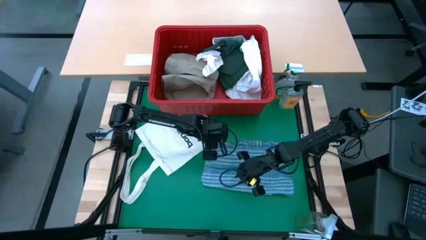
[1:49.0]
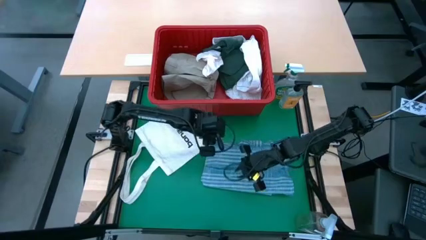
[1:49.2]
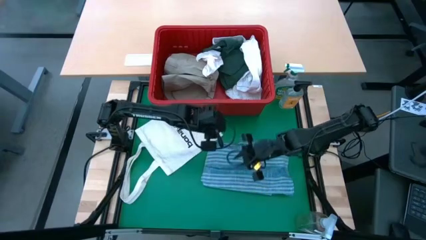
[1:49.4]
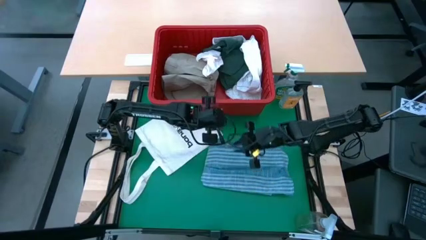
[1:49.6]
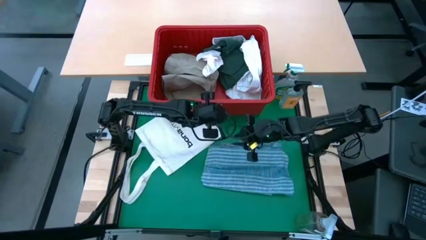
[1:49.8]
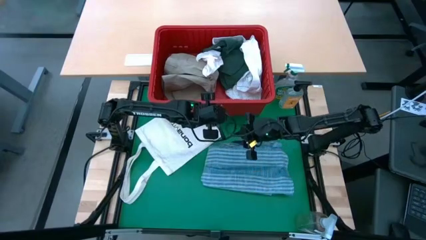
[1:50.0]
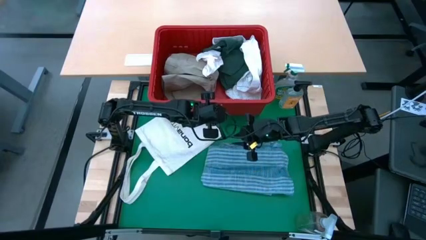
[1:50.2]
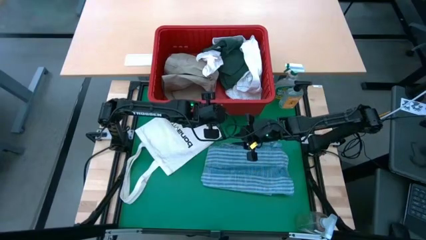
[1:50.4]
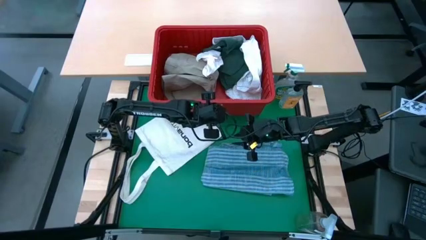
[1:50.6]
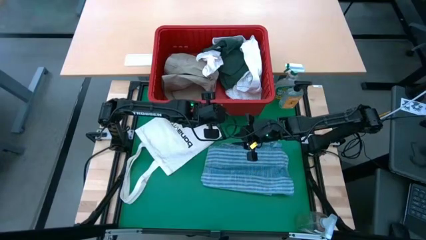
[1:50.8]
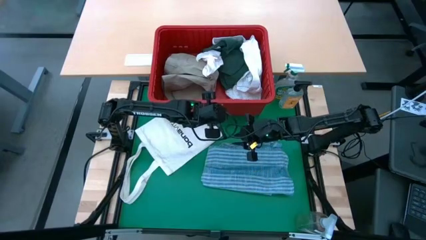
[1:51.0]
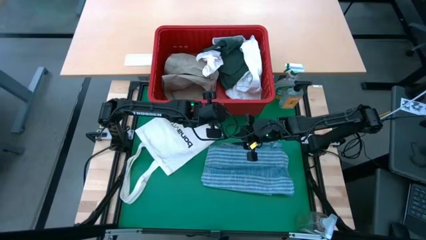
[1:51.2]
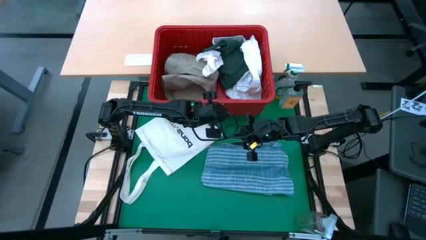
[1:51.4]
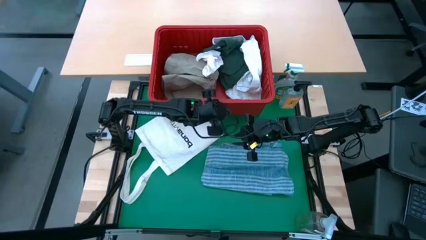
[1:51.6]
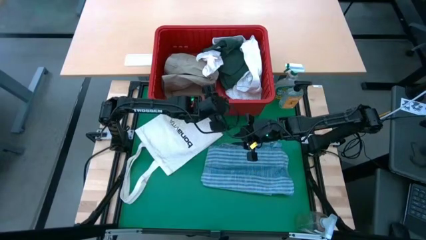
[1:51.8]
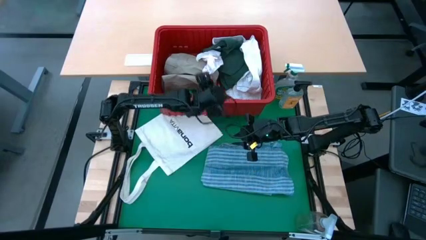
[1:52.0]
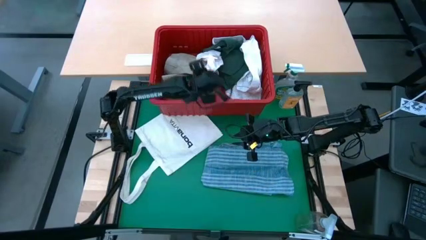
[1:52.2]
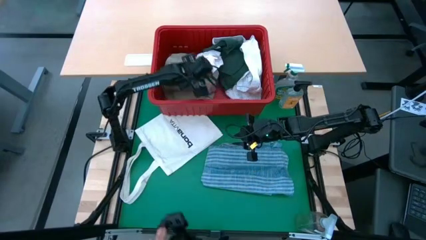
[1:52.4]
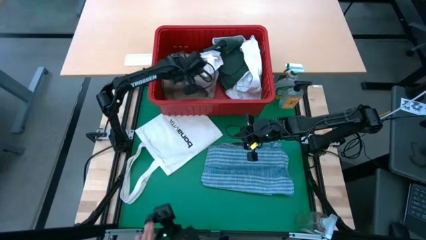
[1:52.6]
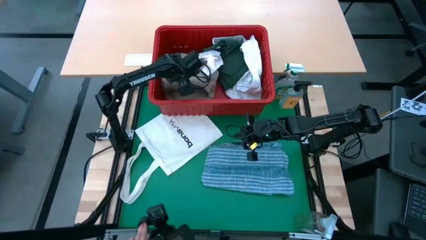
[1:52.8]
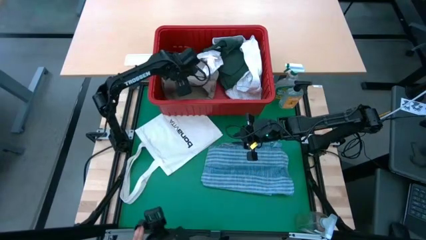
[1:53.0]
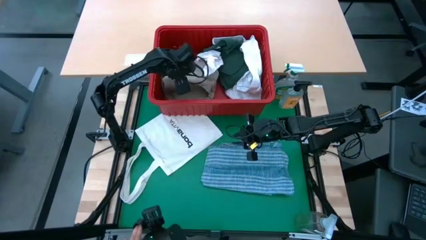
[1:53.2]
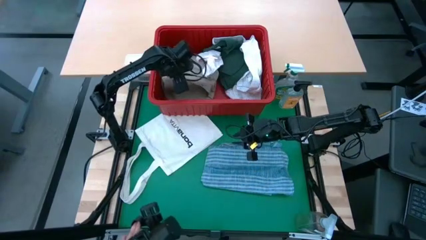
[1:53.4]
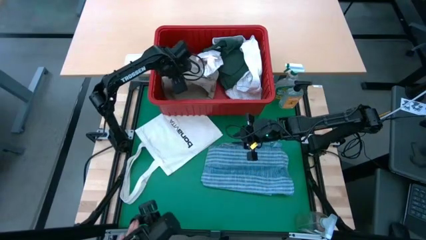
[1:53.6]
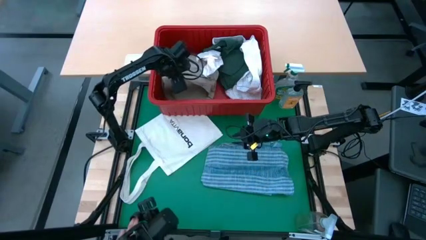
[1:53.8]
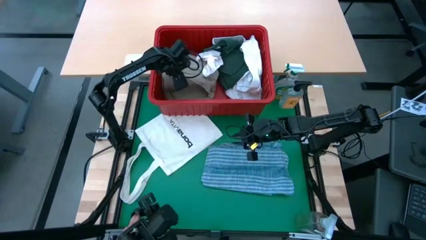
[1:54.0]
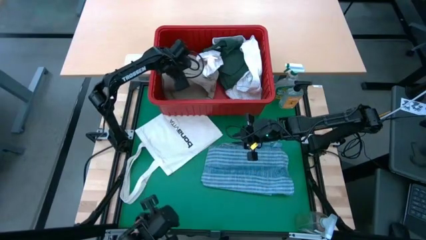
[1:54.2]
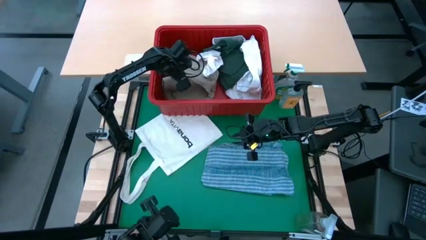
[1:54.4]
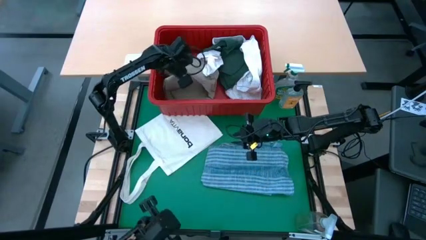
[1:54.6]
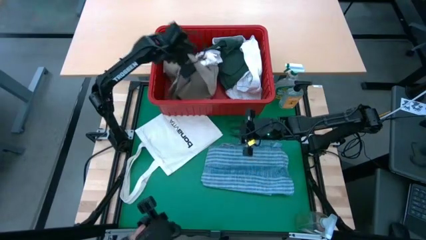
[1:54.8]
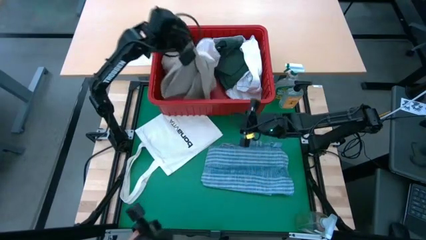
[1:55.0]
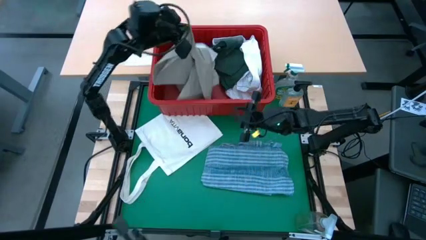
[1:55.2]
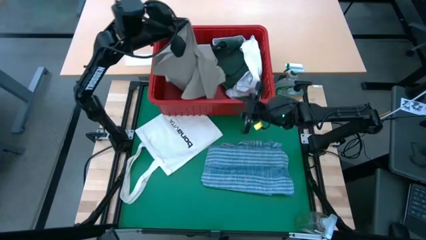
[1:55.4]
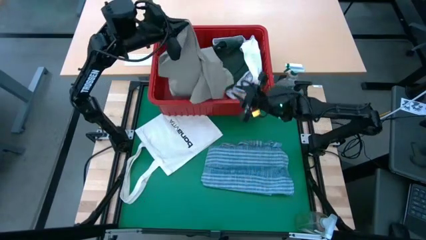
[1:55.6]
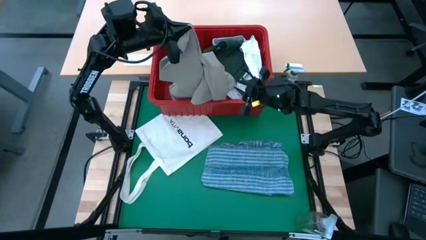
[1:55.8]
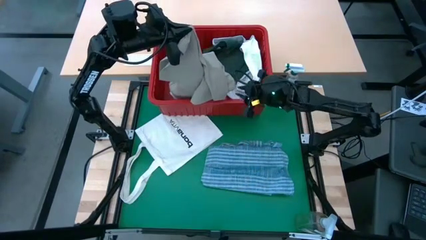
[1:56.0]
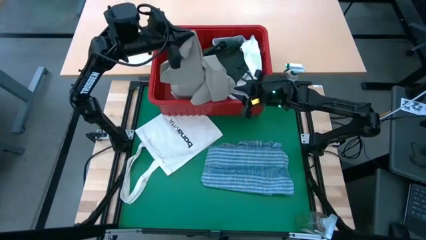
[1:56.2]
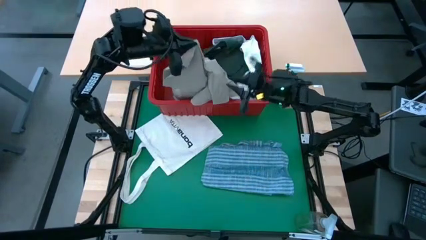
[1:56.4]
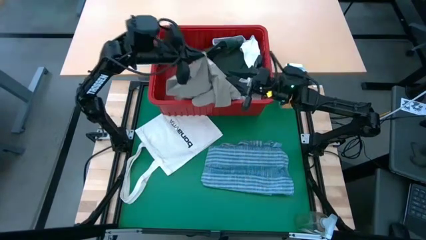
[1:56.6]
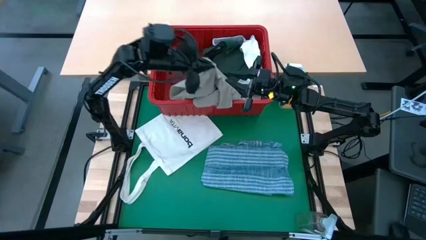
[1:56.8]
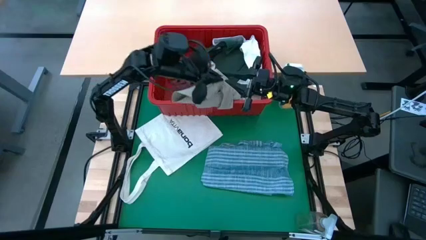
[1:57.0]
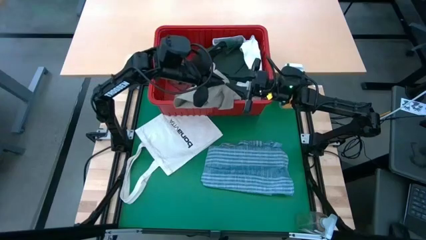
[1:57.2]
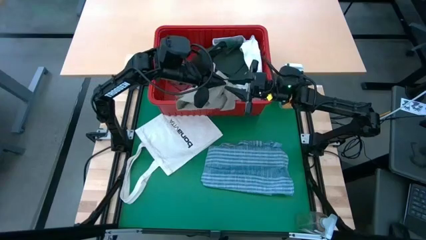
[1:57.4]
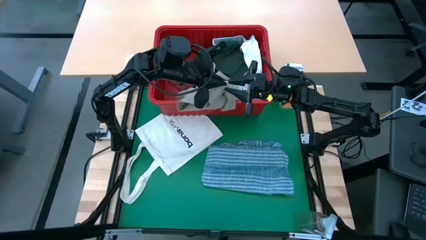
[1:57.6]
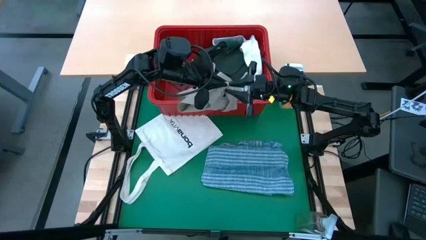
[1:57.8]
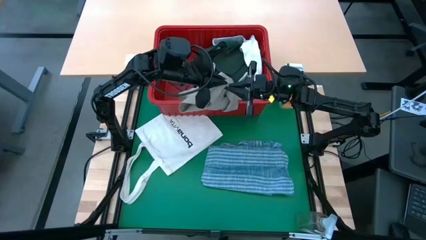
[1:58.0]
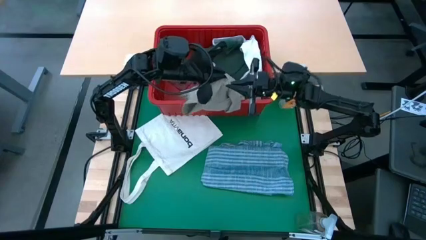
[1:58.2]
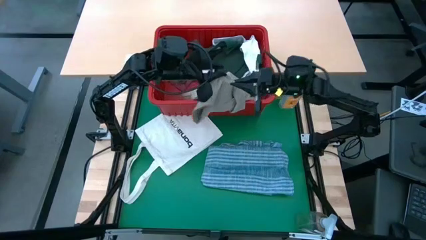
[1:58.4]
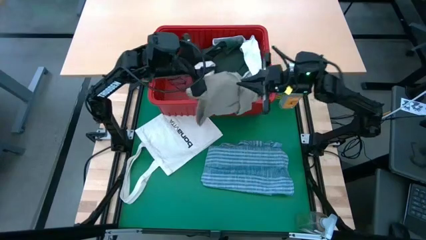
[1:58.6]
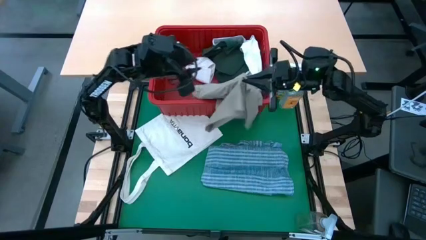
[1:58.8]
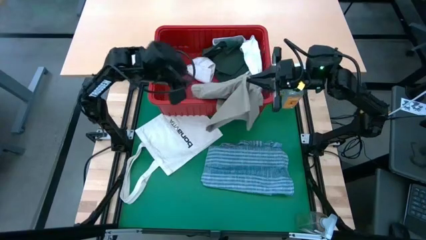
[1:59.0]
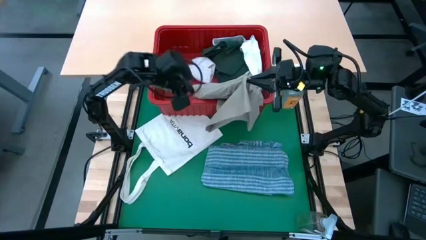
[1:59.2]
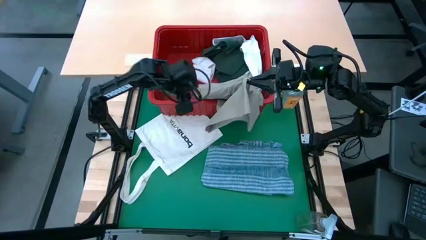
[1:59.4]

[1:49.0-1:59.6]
Task: Fold Laundry from Bin
Remove the brown shorts from the red bin
